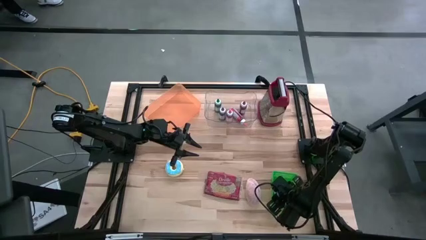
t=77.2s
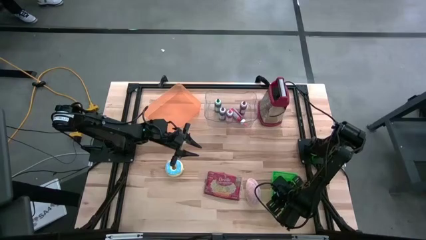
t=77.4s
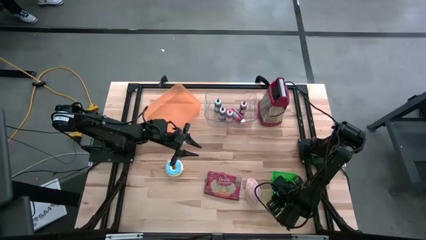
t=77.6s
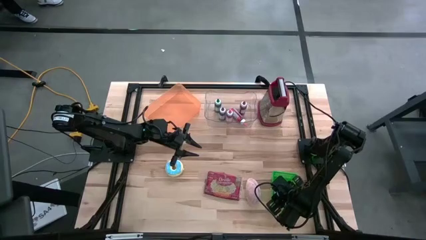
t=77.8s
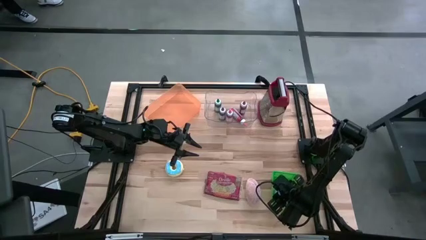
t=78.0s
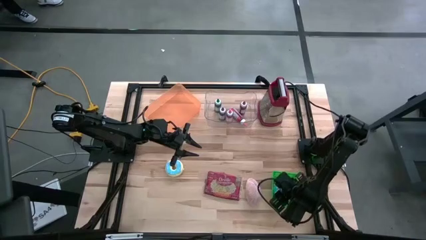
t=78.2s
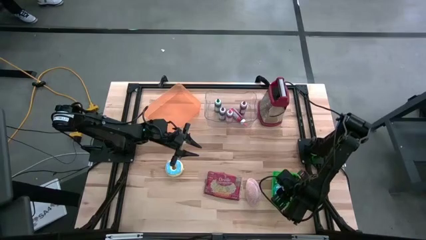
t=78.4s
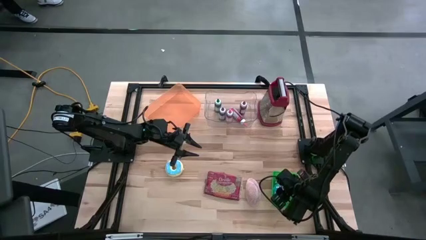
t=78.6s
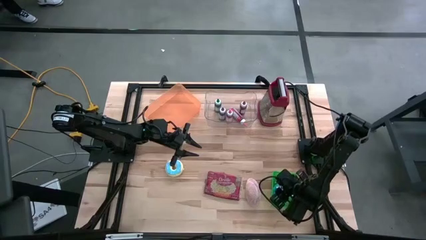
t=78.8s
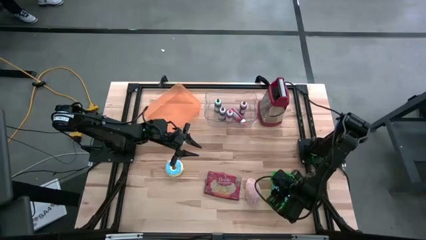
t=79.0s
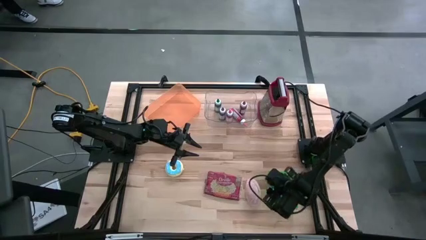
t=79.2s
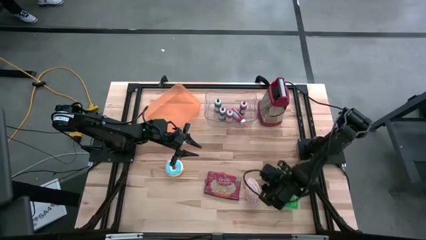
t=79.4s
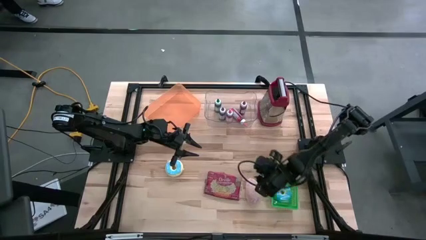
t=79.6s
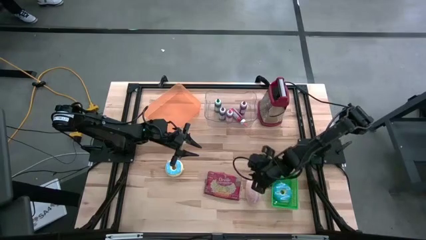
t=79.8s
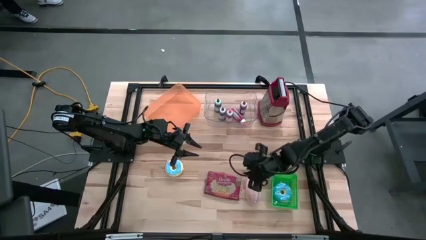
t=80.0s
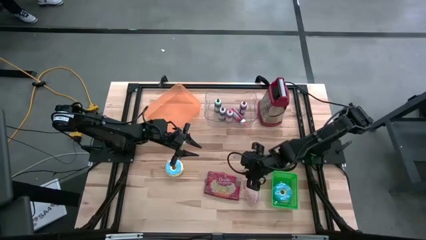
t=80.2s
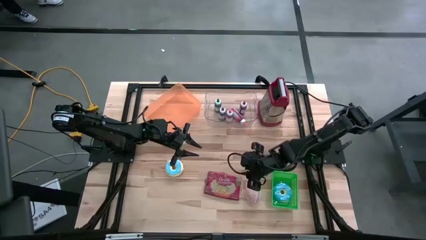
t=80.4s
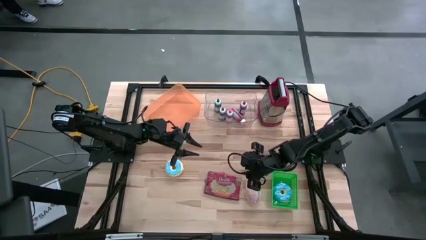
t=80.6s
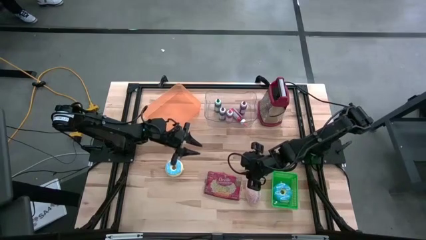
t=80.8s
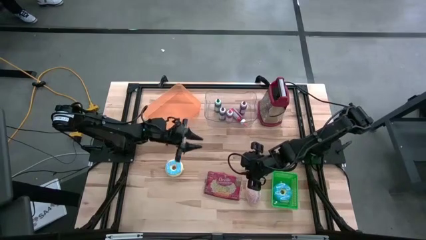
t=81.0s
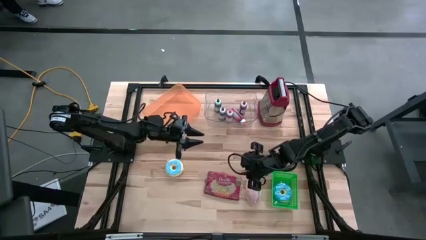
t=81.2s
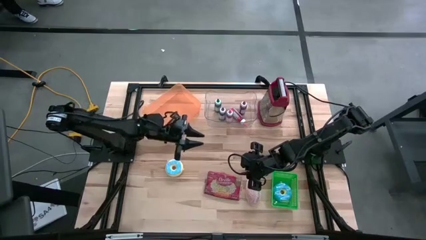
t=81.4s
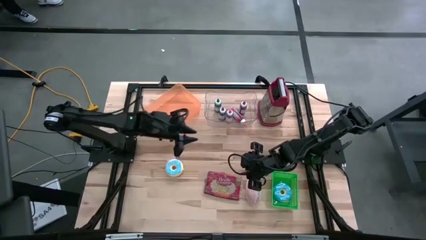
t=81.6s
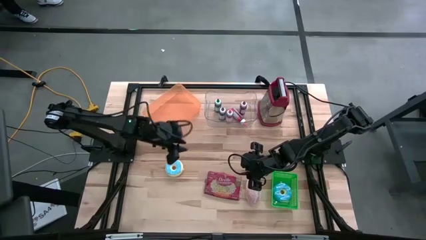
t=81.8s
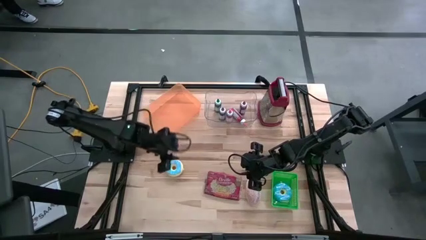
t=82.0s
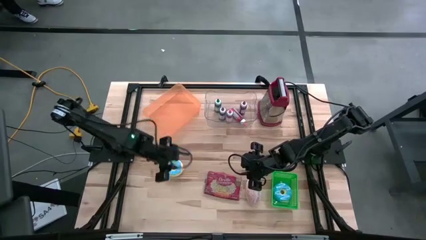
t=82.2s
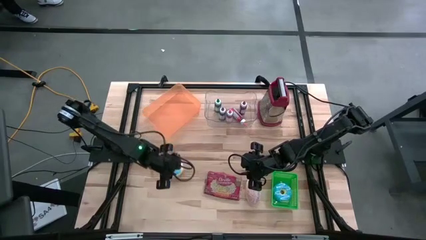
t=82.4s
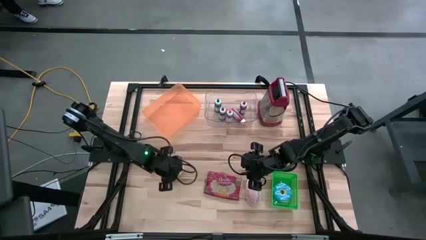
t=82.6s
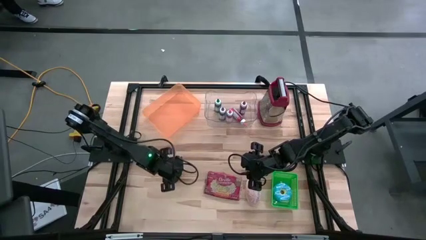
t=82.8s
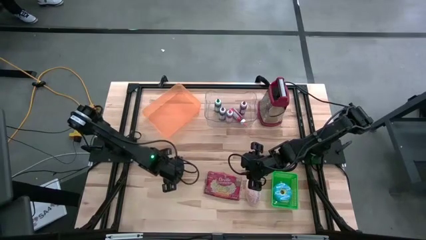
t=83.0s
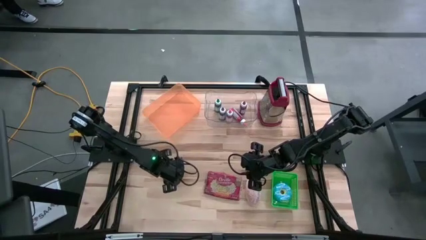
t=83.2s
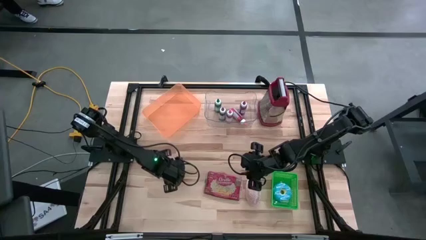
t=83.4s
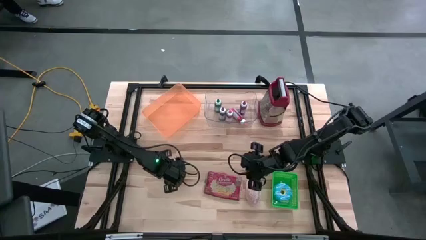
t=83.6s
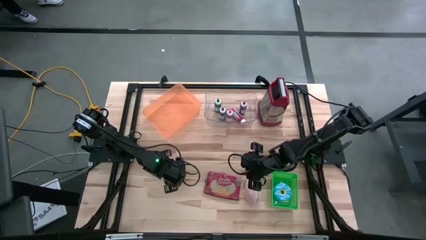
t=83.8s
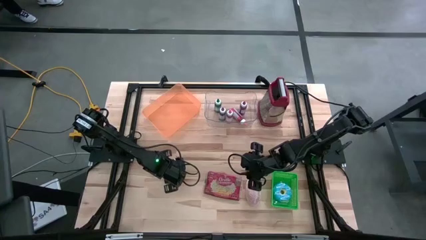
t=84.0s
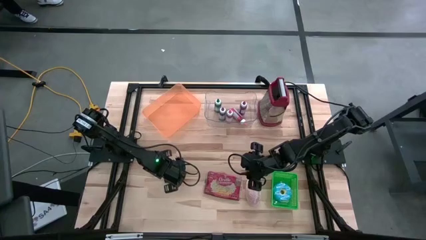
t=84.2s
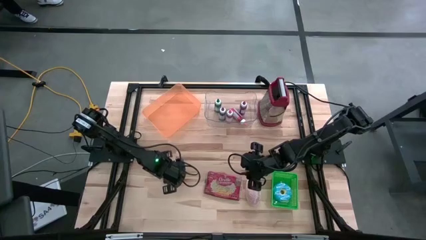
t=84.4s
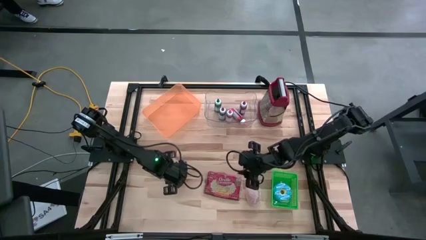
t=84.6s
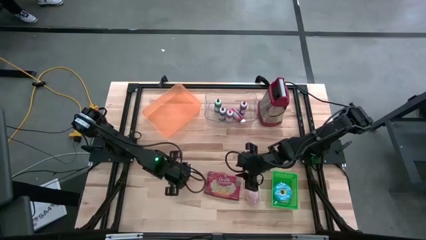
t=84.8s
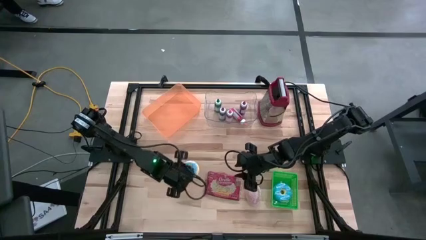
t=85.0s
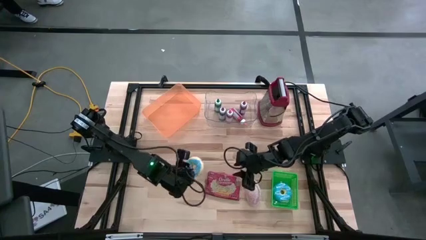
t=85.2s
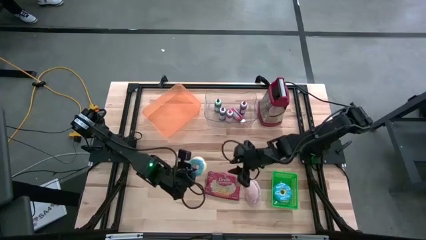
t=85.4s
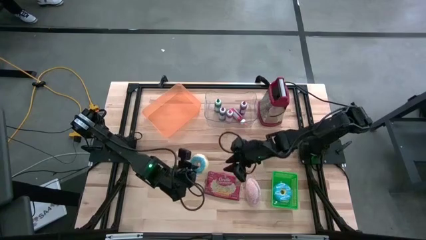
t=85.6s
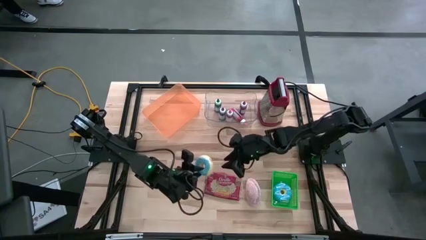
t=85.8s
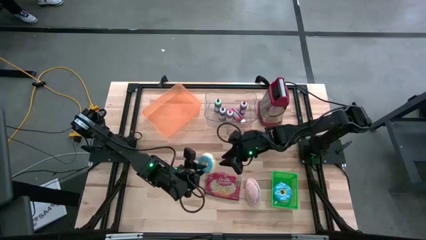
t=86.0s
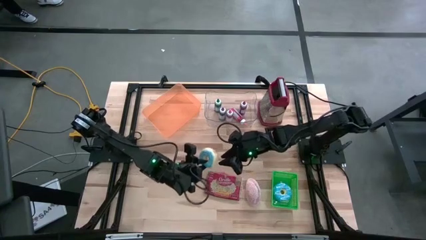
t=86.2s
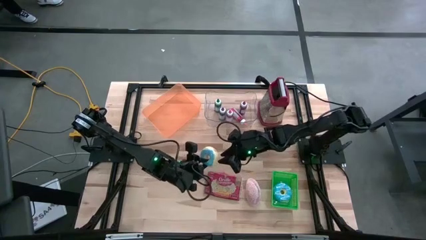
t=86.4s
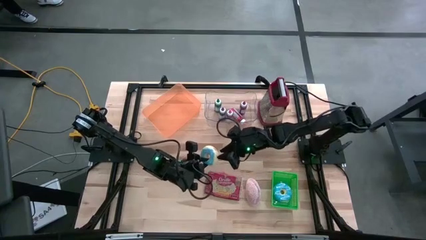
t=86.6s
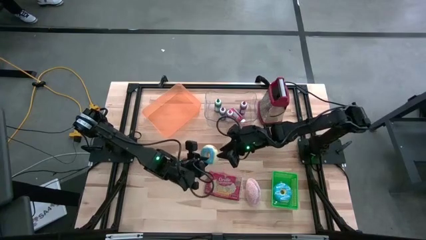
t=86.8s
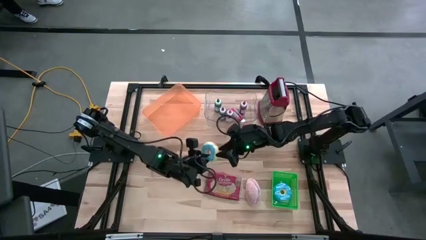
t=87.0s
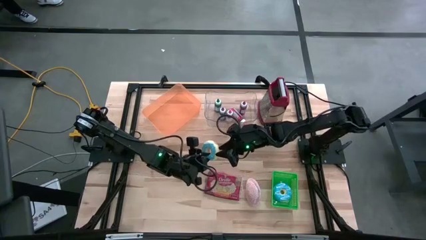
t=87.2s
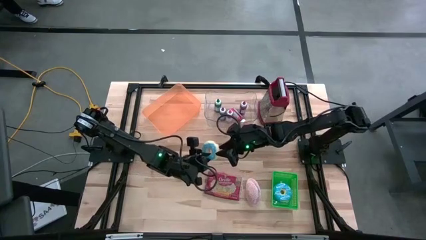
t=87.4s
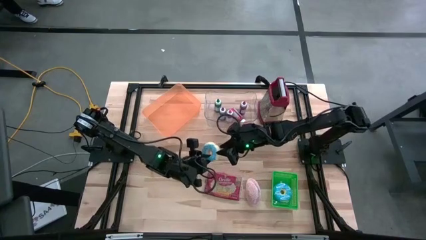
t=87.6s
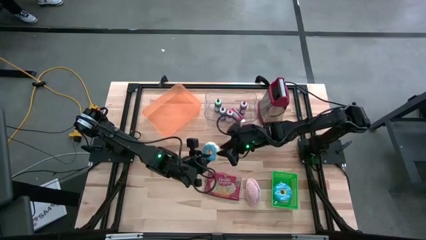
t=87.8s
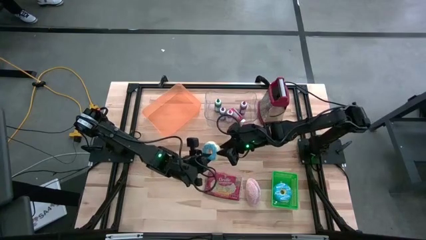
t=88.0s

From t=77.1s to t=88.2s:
Put the light blue donut into the green bin
